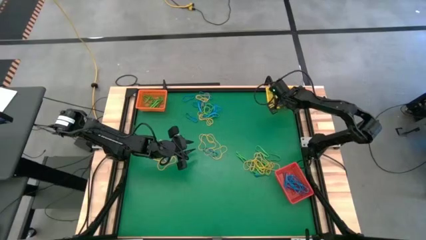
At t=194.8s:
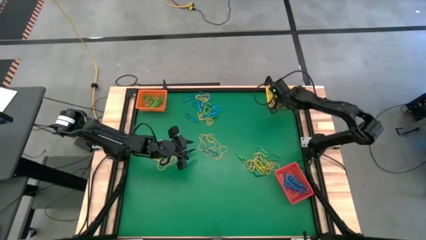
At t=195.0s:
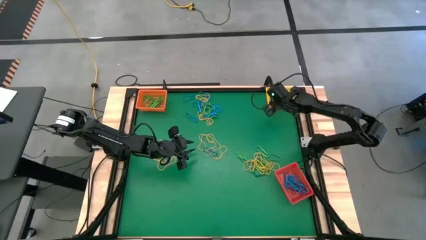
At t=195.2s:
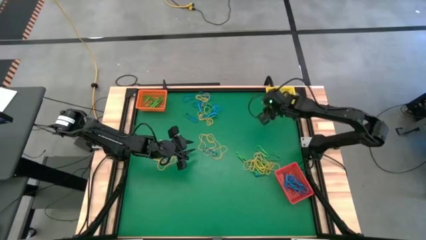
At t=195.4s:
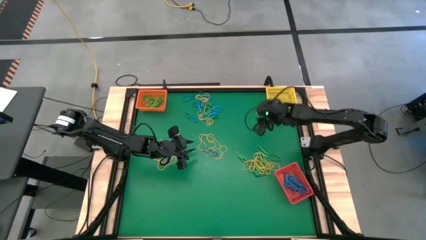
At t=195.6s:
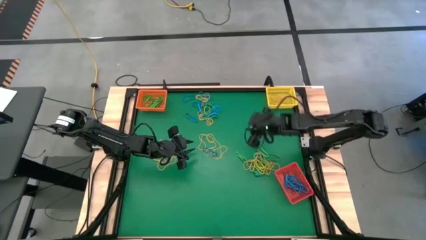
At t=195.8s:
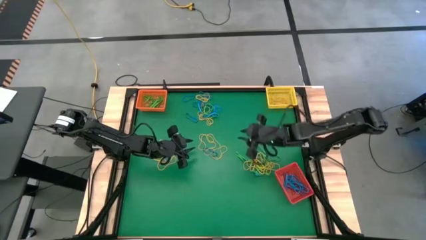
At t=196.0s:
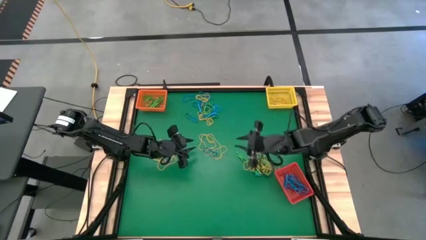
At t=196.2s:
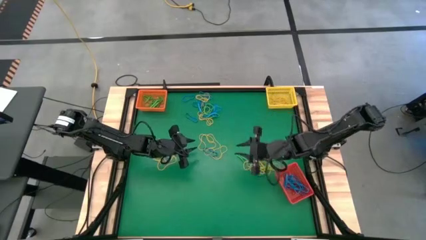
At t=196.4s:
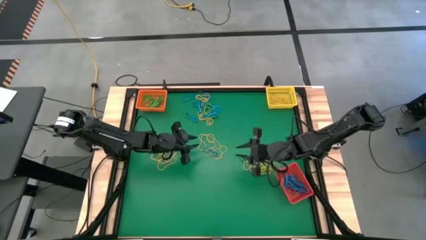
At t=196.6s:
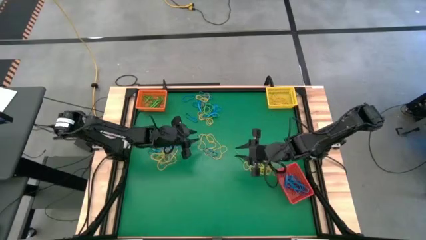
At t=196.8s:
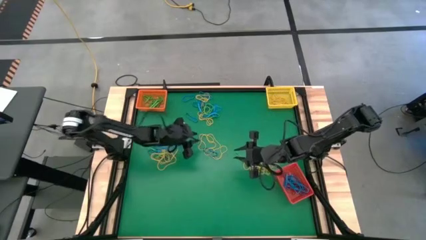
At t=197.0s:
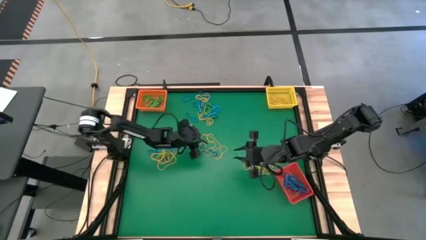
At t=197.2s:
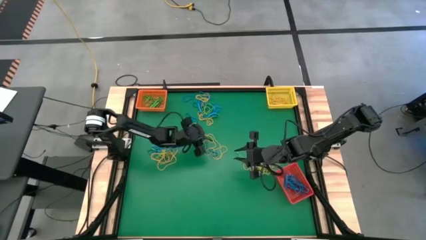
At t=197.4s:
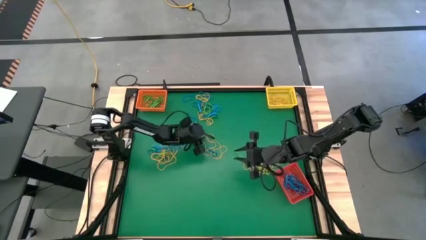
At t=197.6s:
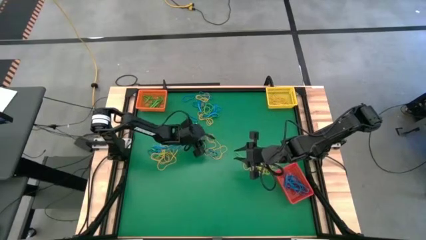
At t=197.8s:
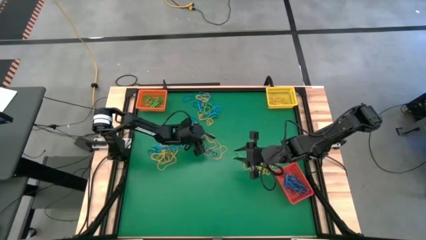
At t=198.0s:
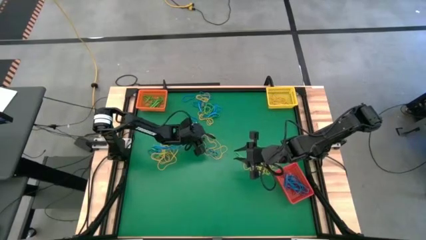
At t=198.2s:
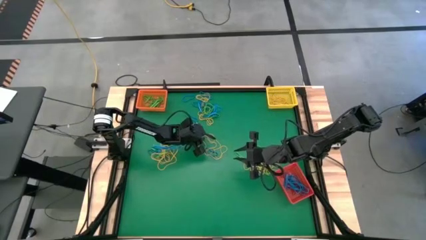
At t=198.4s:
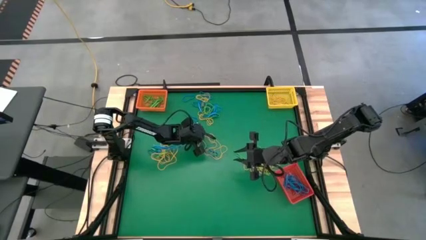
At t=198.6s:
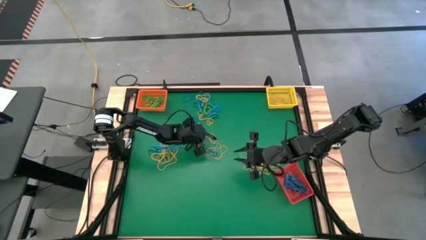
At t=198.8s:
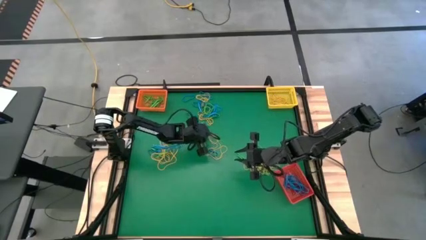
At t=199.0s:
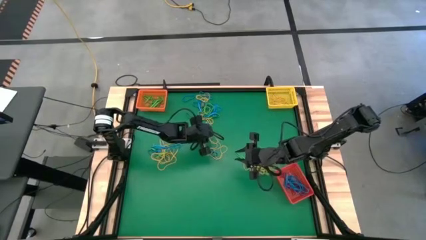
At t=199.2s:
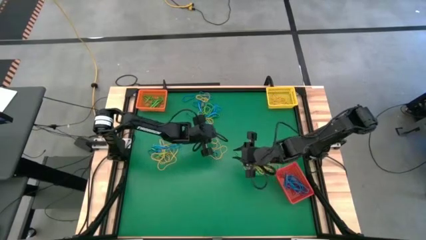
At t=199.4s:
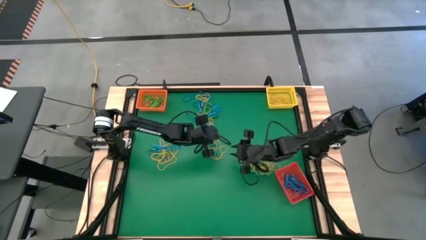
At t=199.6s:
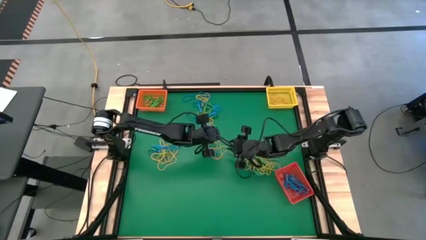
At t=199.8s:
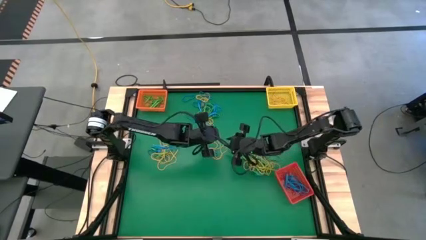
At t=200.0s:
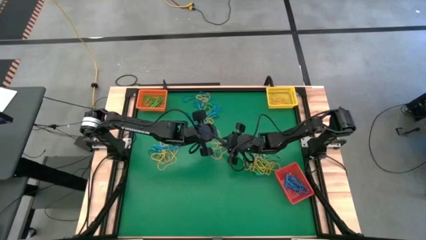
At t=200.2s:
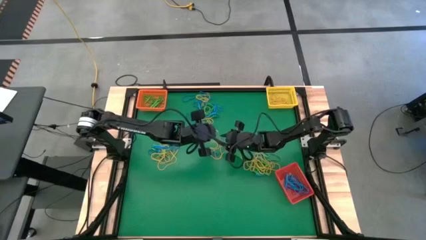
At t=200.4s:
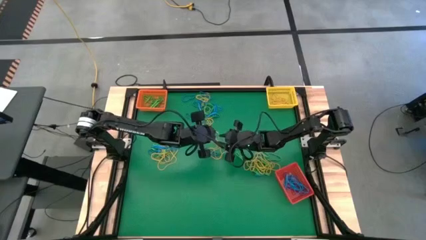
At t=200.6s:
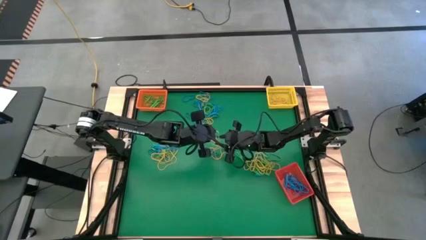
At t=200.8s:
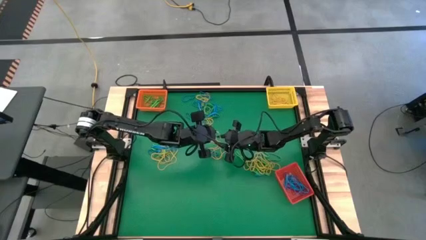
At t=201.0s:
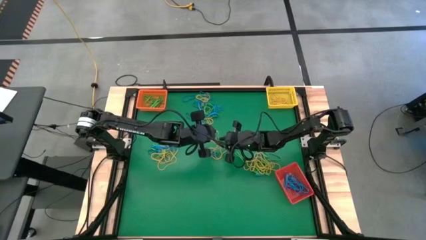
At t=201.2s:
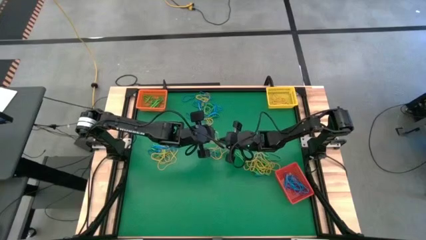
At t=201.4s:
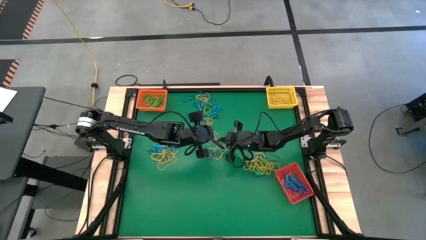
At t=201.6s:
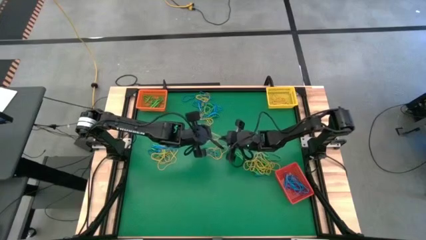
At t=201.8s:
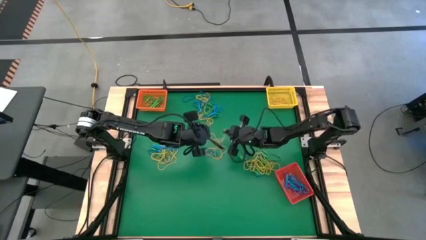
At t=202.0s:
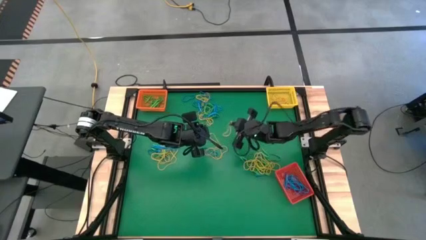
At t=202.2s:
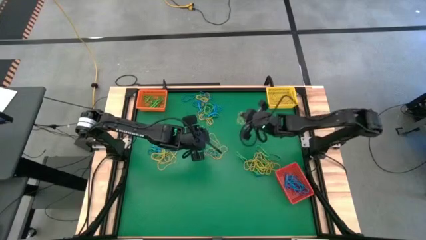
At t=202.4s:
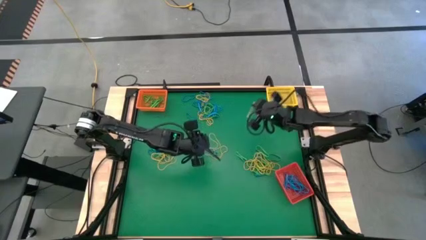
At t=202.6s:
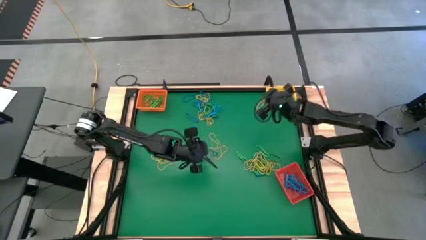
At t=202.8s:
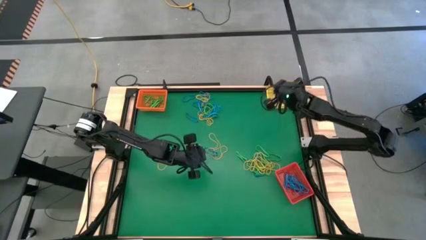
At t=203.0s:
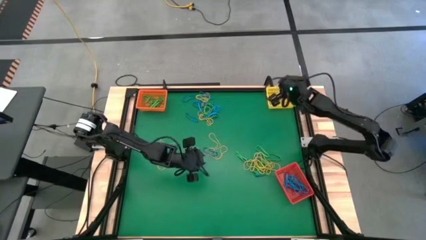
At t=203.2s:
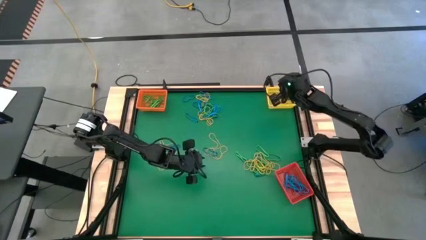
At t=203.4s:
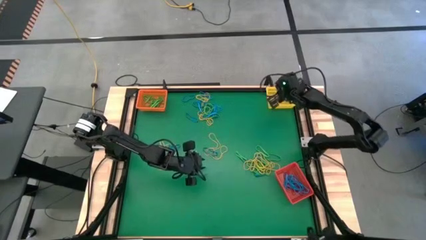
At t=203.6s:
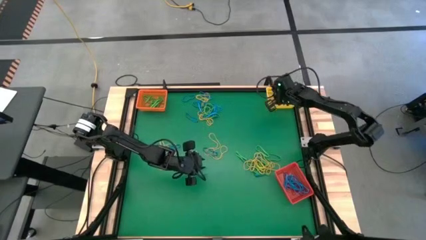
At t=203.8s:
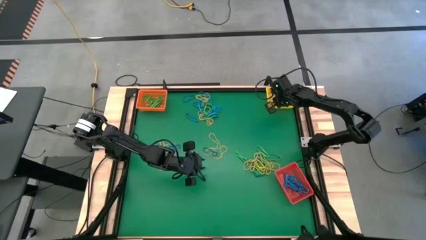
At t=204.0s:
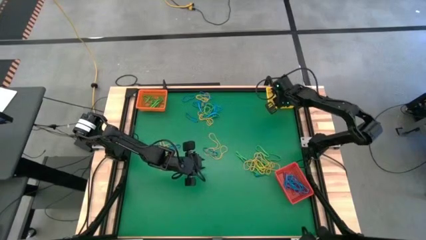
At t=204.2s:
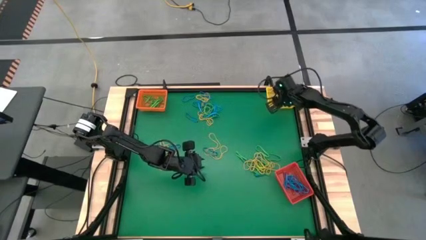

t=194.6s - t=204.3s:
Task: Sort rubber bands into baskets
Put the yellow rubber band into the yellow bin

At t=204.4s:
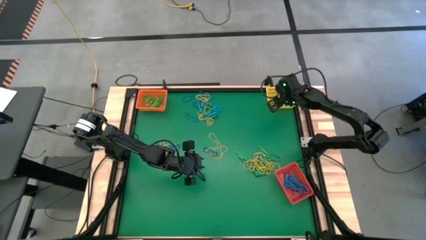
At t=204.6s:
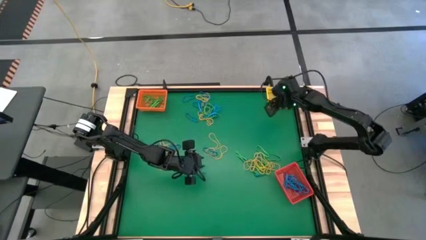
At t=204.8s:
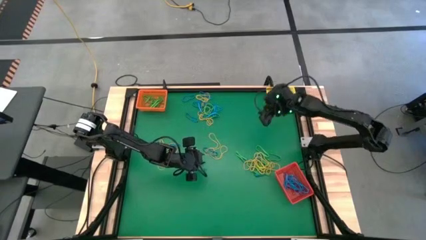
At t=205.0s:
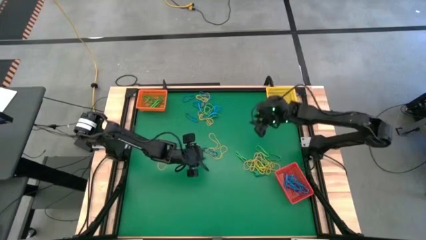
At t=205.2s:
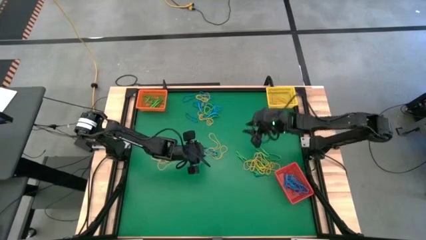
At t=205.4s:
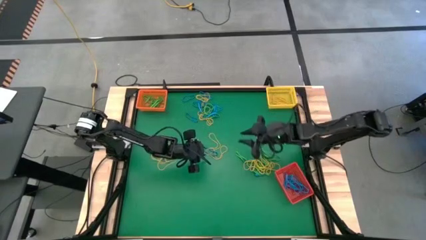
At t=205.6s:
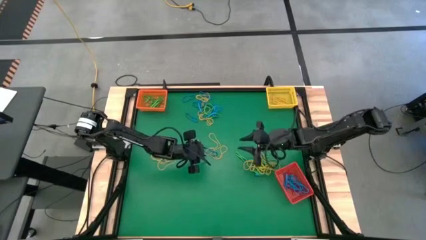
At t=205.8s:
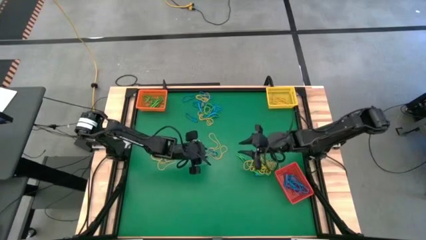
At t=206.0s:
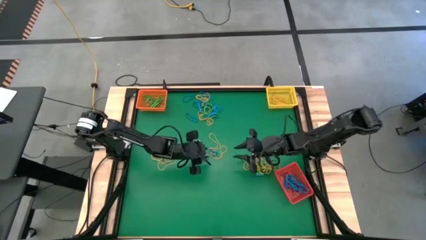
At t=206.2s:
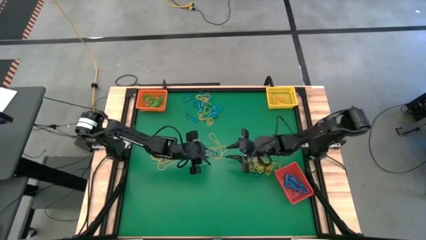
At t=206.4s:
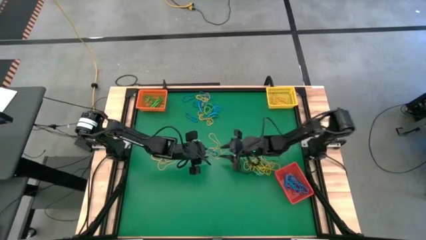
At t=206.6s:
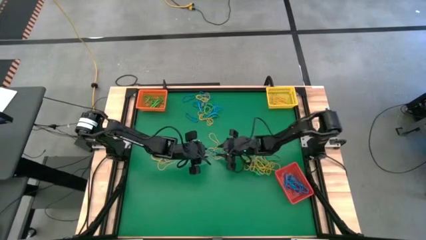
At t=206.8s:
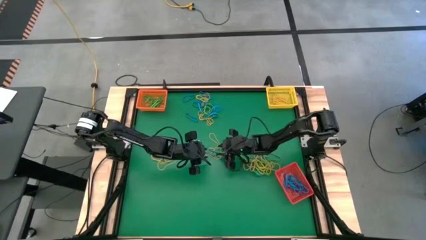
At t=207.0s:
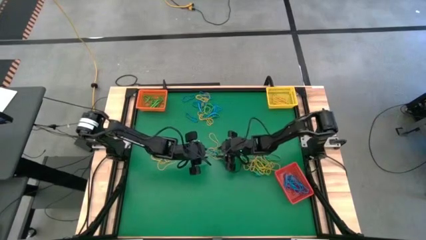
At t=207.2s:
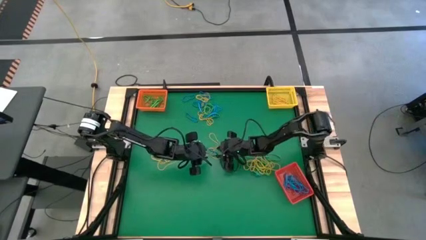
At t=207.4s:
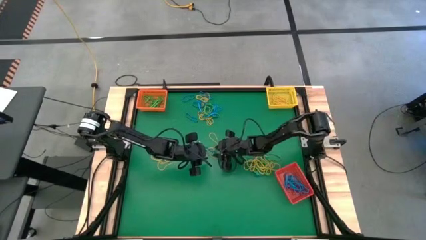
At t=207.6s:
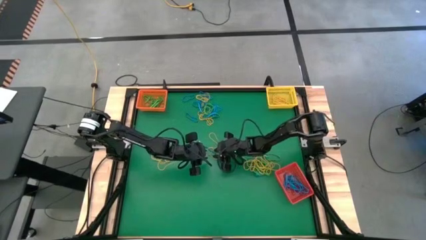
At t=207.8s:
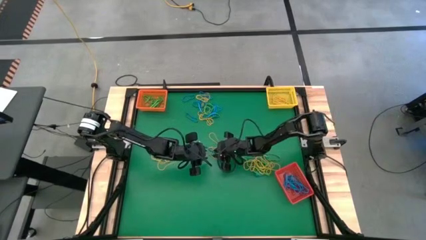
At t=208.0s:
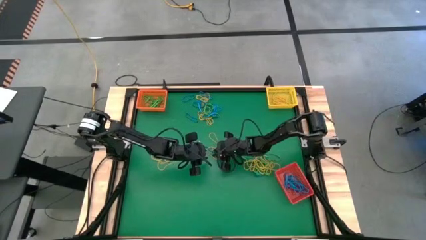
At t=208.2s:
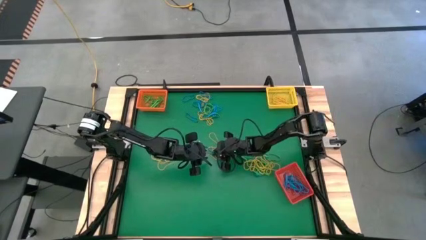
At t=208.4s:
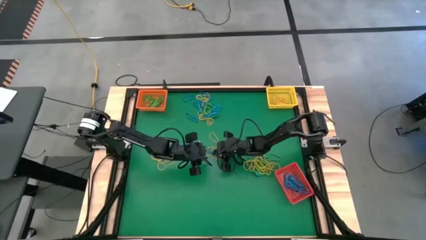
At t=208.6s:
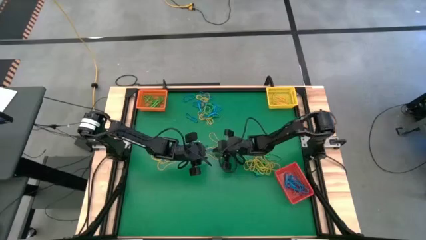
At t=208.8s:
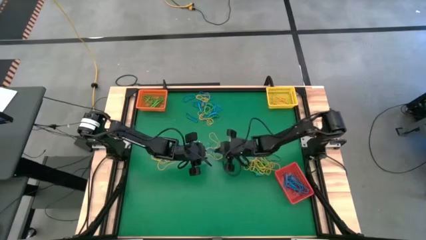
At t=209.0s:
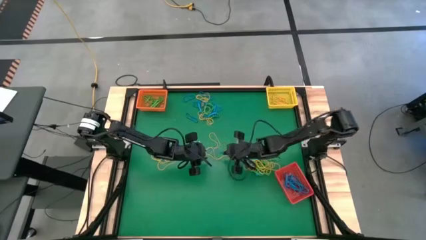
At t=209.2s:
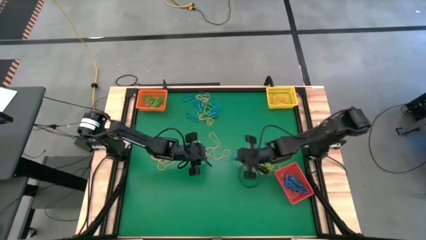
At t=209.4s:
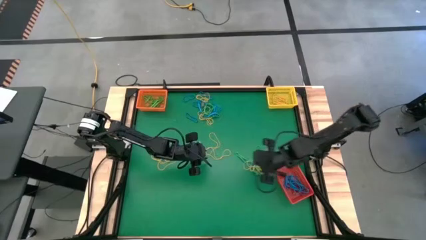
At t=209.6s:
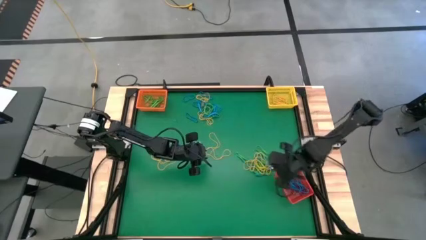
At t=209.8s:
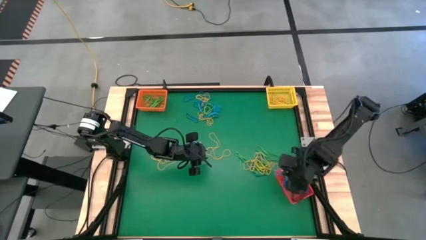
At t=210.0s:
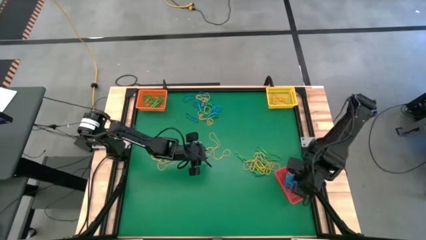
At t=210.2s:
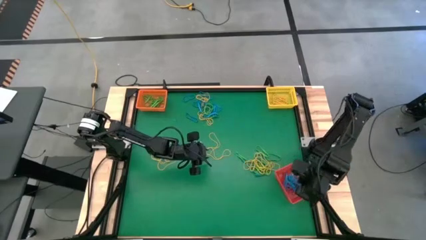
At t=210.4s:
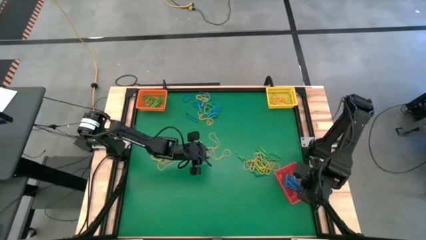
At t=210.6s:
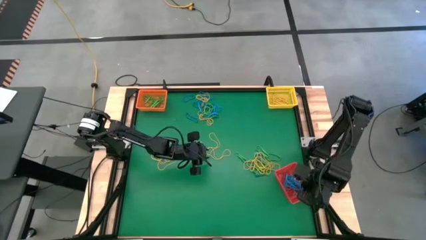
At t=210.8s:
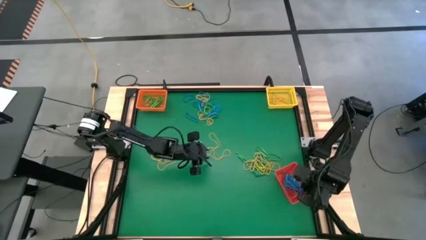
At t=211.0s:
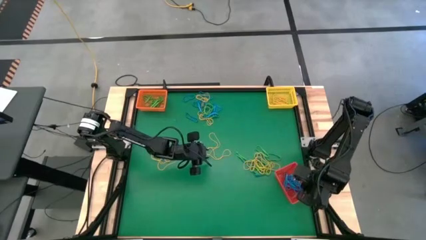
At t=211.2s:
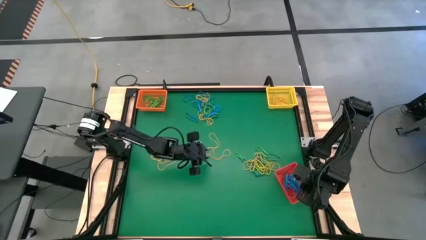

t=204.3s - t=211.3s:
Put the blue rubber band into the red bin
